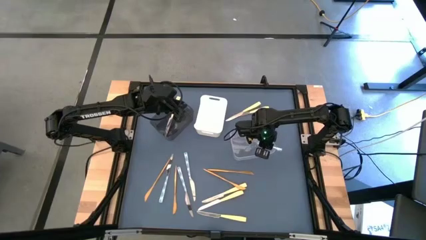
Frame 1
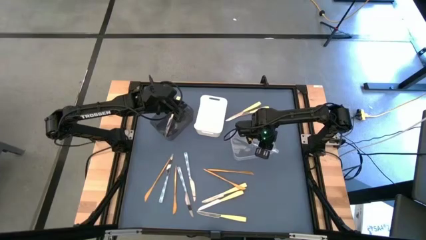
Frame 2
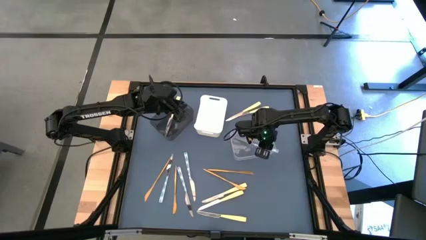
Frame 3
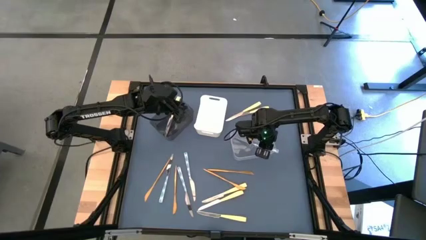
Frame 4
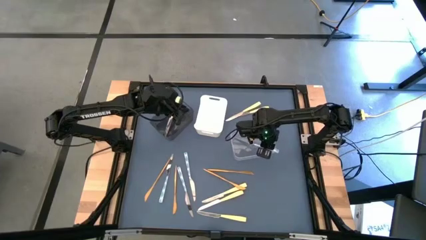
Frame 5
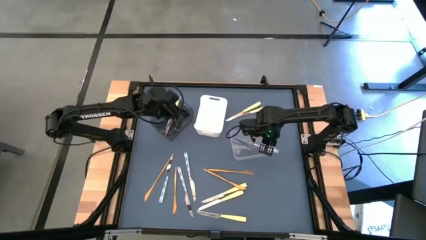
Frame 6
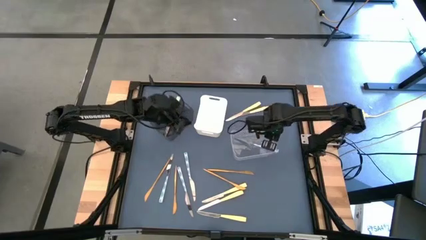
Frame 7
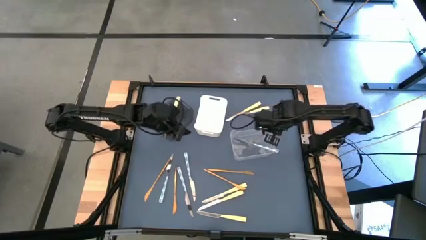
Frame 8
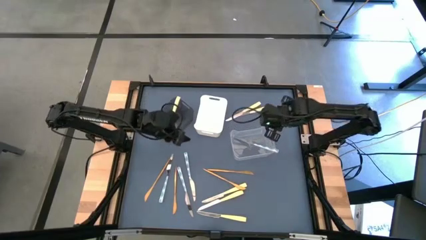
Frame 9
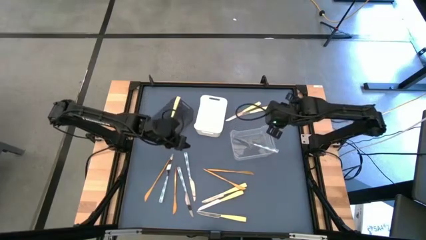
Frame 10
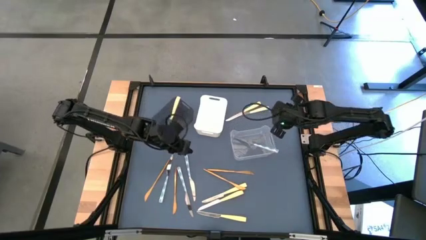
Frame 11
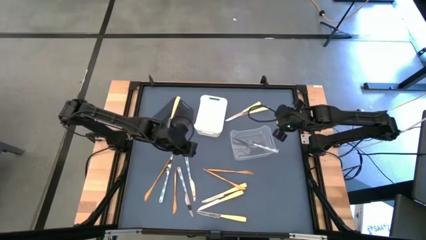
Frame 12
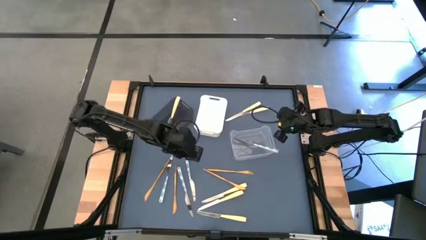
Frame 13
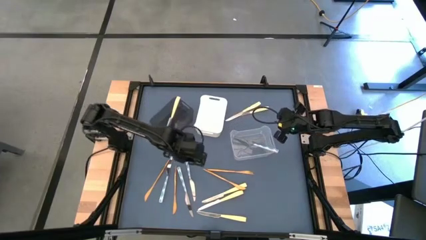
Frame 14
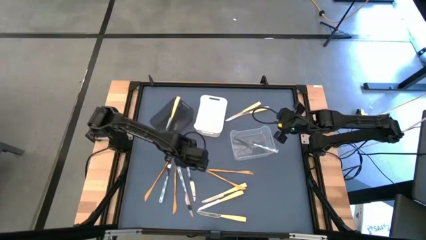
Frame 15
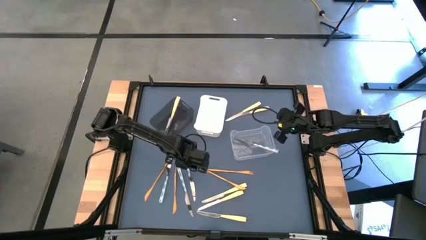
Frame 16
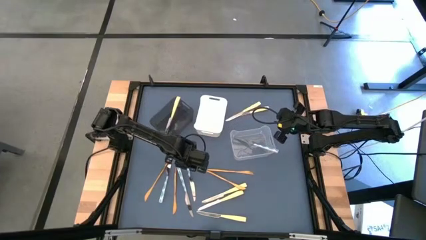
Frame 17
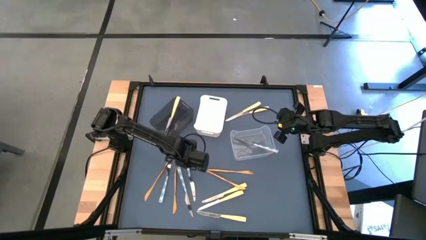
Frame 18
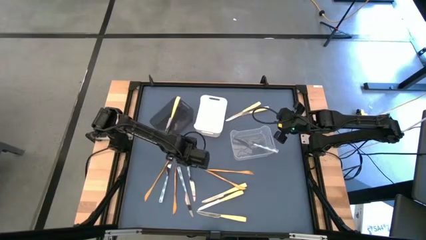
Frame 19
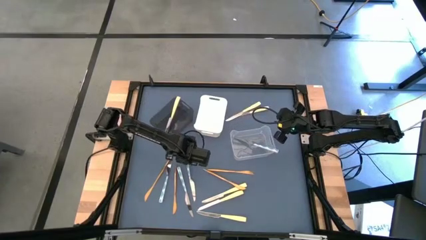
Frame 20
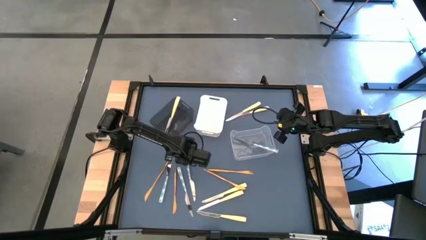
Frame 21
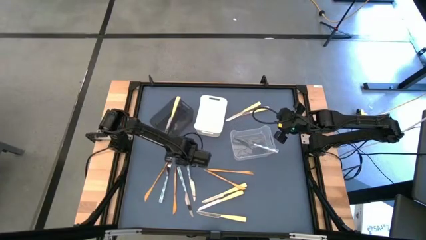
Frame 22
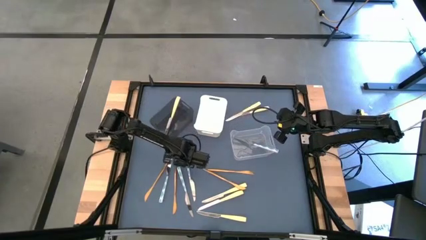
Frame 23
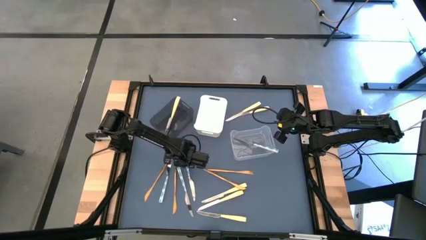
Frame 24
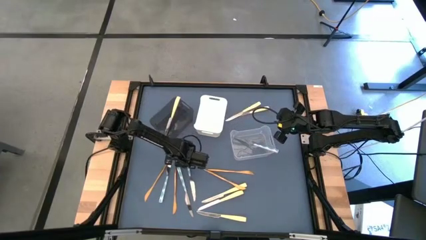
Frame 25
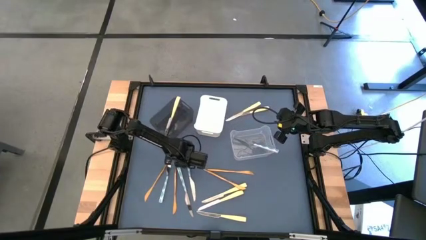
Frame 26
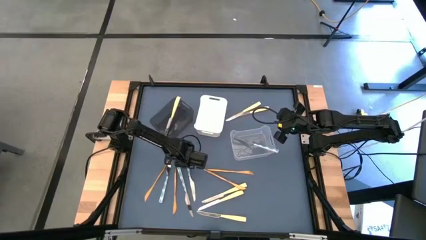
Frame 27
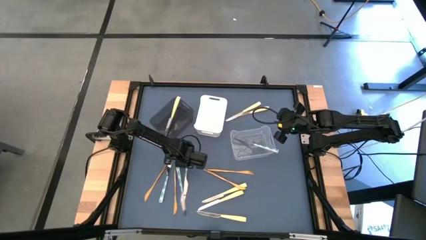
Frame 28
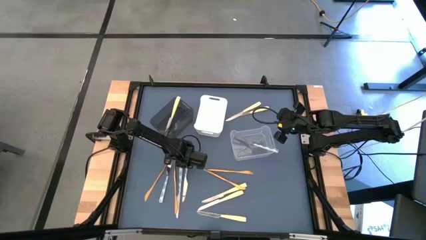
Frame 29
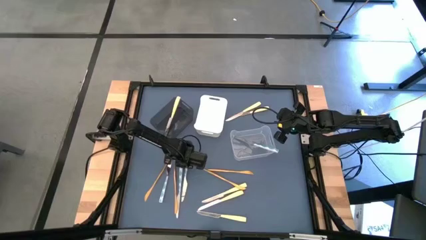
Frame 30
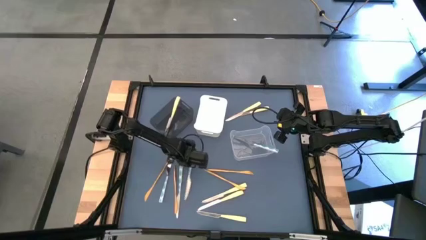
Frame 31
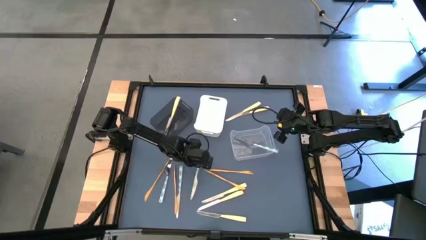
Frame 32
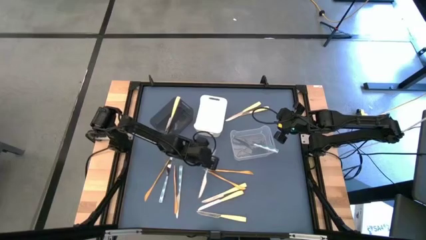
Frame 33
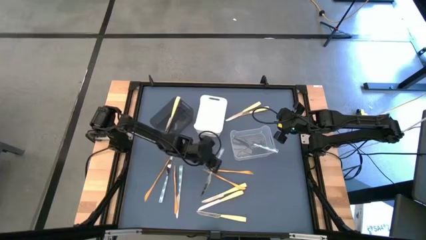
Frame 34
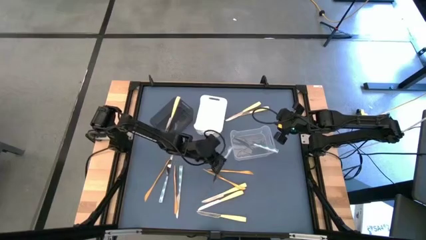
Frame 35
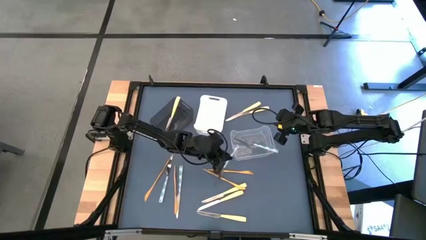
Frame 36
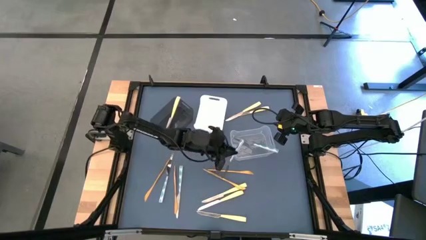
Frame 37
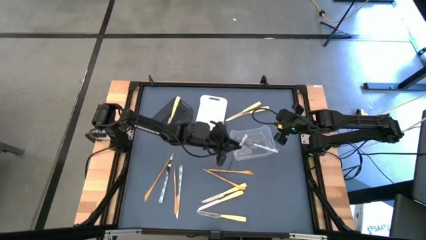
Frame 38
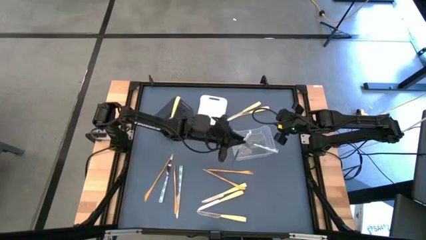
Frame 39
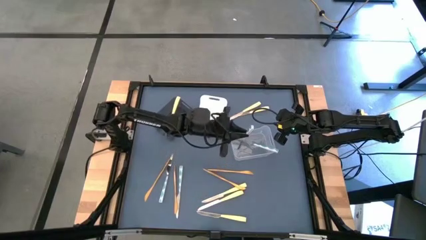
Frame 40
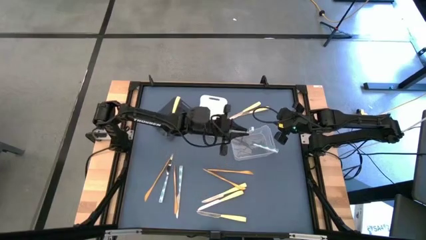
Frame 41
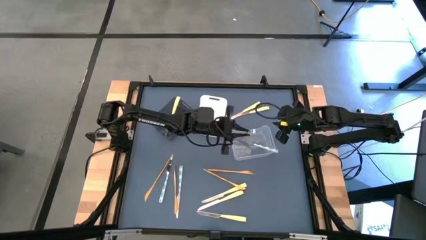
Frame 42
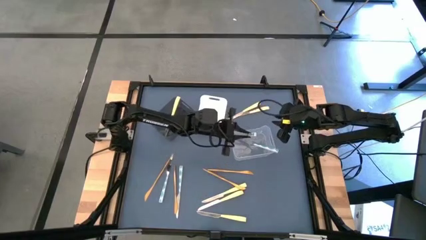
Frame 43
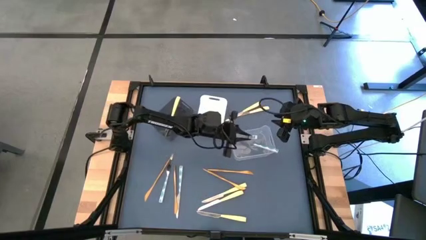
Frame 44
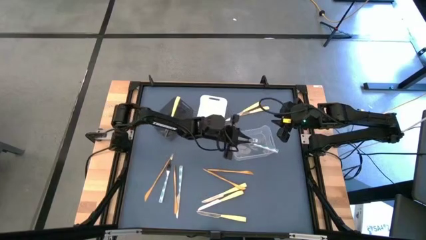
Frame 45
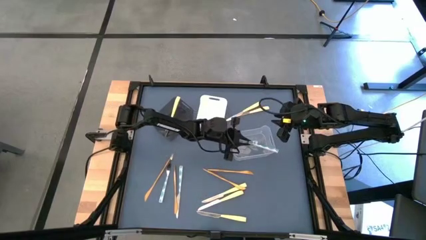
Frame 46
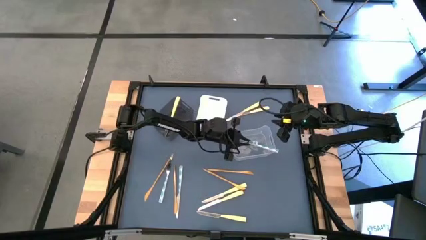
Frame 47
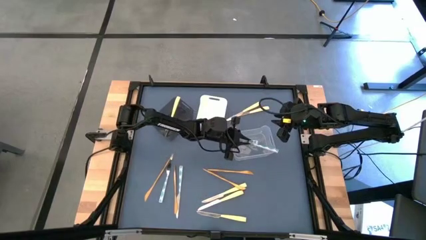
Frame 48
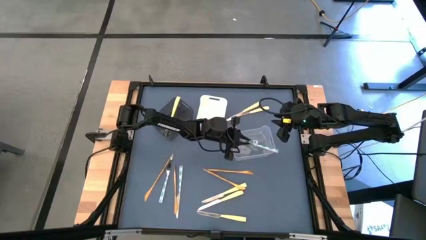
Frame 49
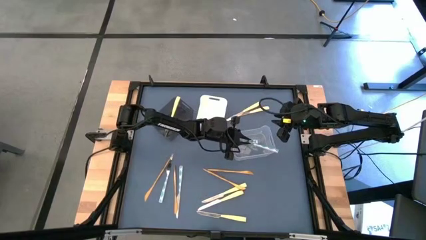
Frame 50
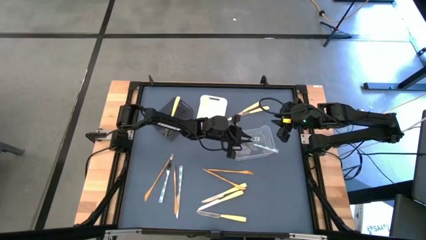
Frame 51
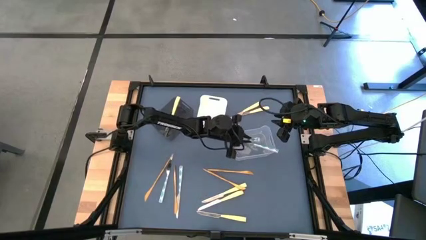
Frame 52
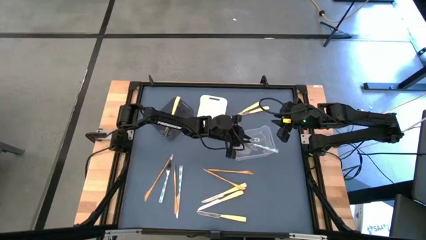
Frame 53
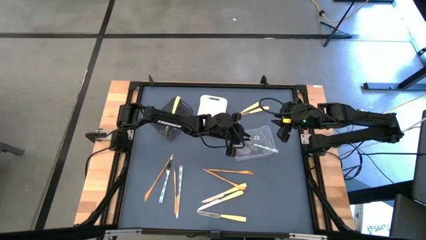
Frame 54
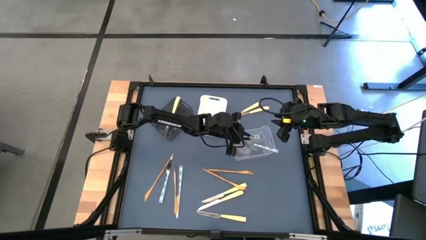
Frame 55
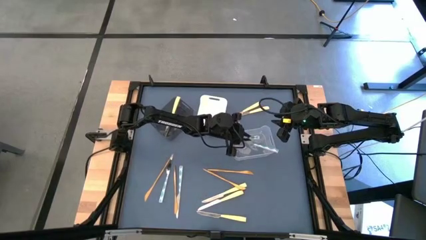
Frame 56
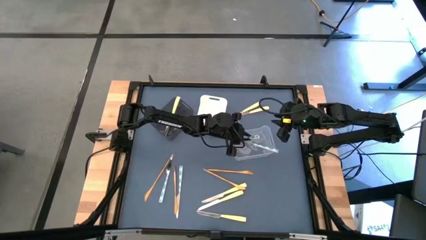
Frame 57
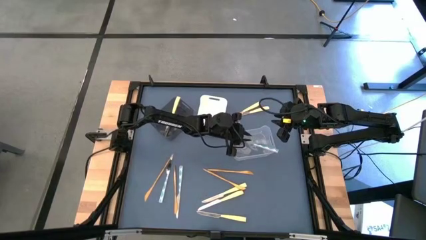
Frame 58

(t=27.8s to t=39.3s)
Task: Sort silverware by color (type)
Put the right green knife into the transparent bin

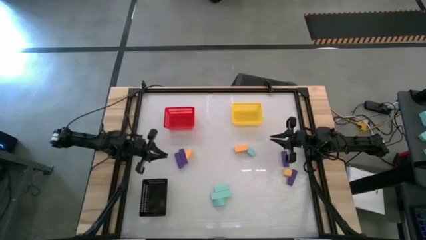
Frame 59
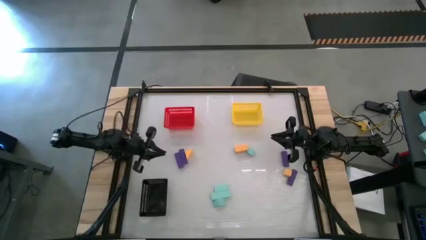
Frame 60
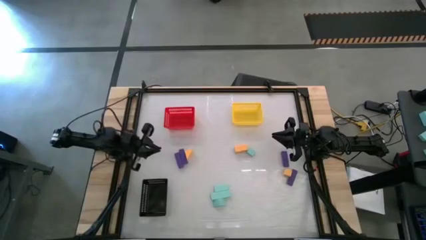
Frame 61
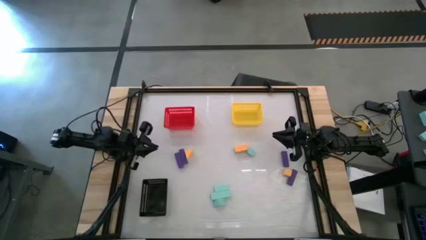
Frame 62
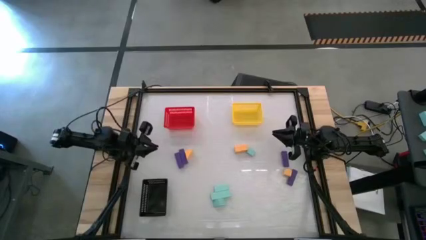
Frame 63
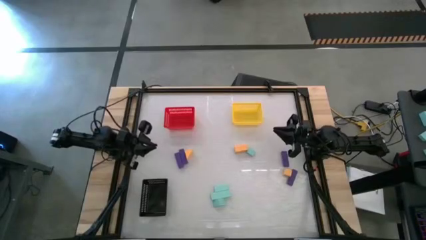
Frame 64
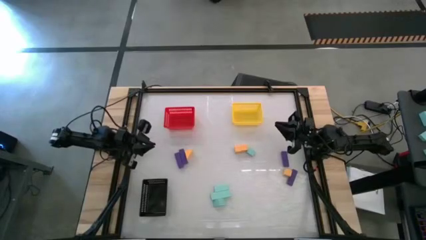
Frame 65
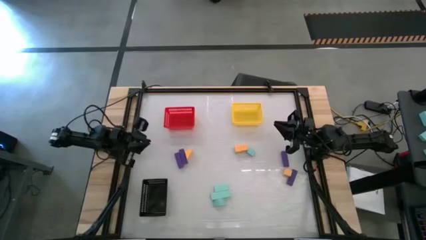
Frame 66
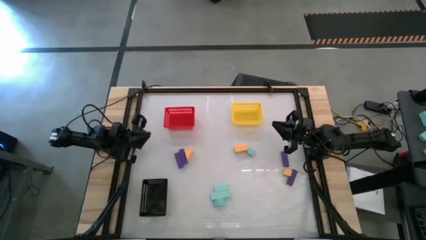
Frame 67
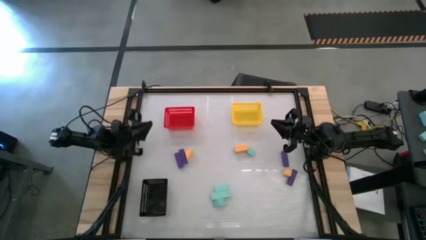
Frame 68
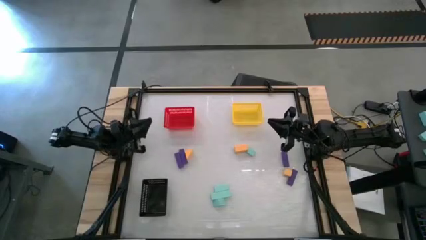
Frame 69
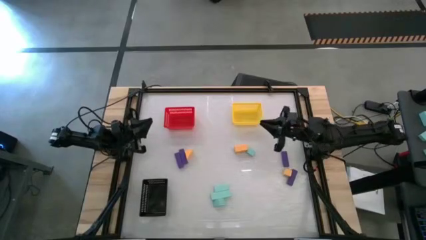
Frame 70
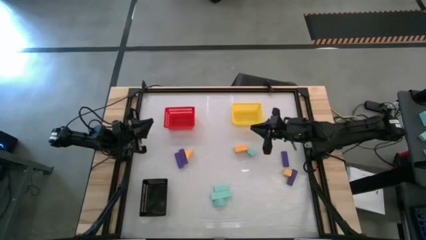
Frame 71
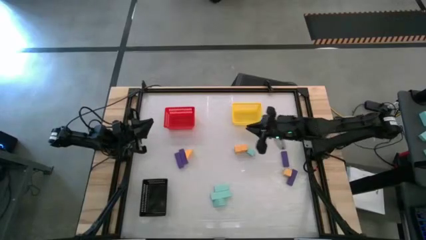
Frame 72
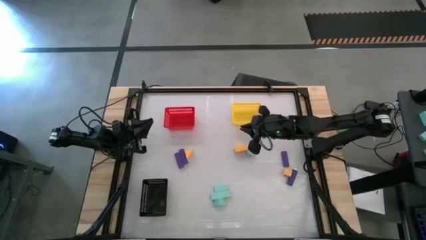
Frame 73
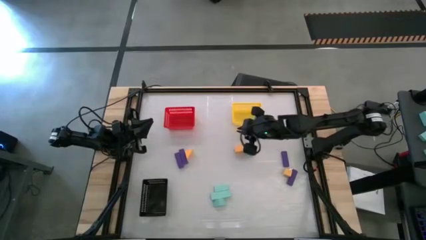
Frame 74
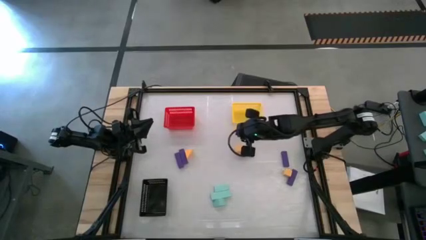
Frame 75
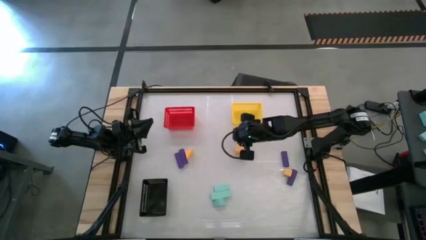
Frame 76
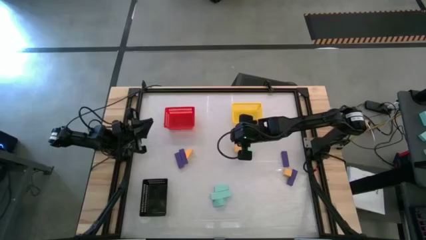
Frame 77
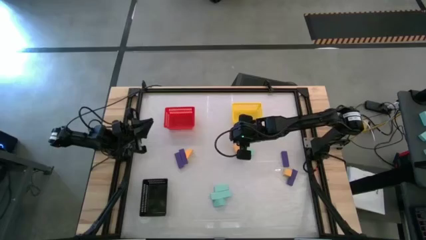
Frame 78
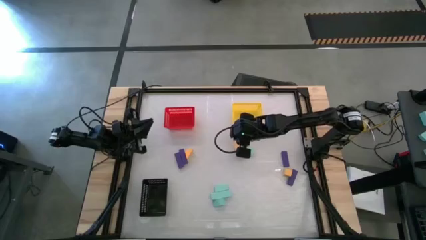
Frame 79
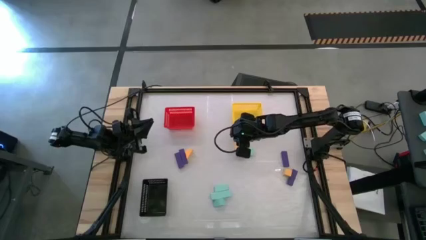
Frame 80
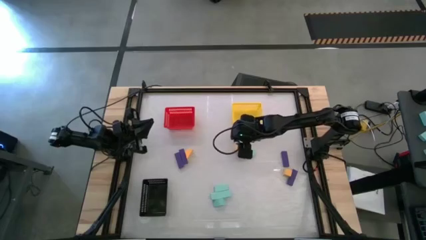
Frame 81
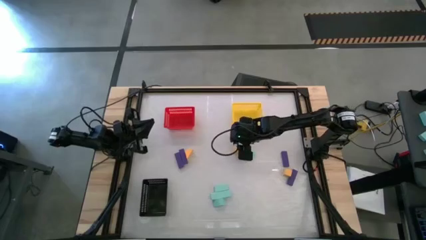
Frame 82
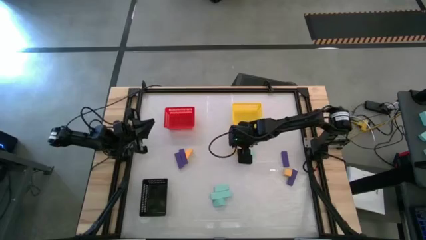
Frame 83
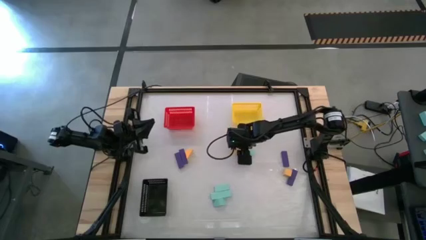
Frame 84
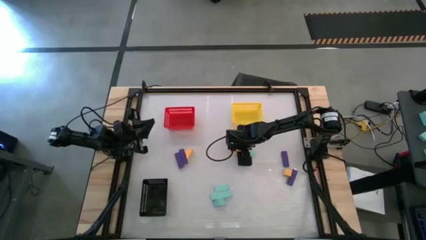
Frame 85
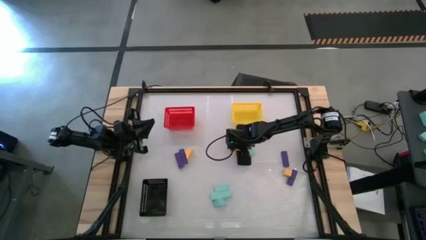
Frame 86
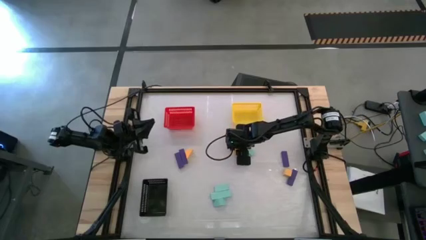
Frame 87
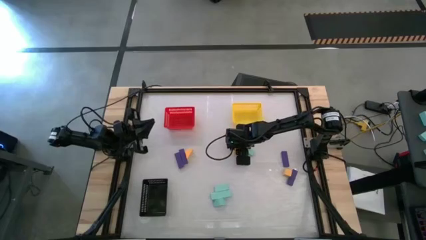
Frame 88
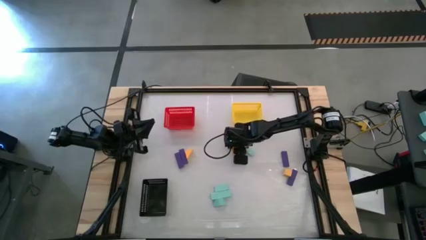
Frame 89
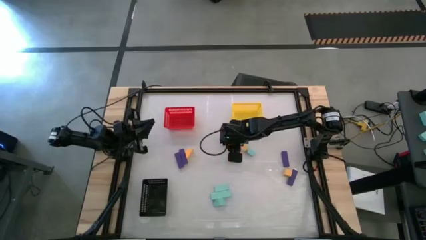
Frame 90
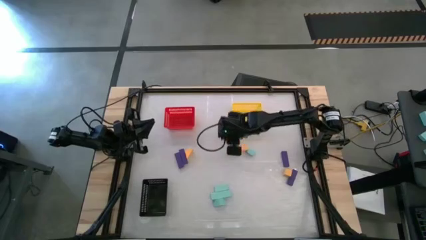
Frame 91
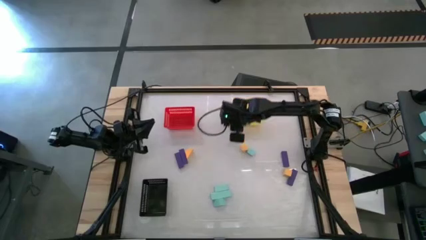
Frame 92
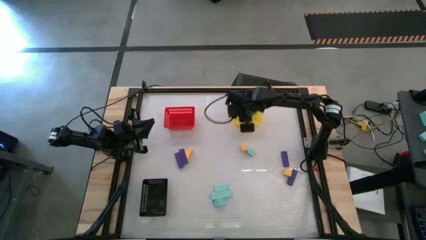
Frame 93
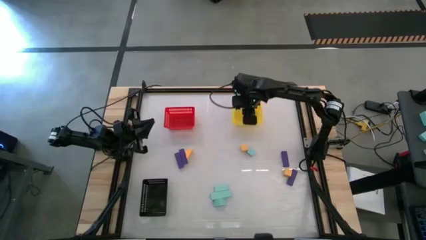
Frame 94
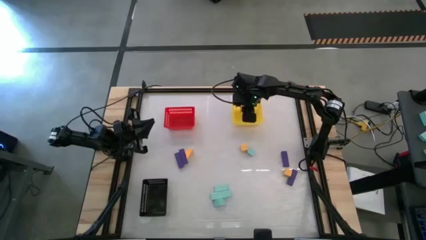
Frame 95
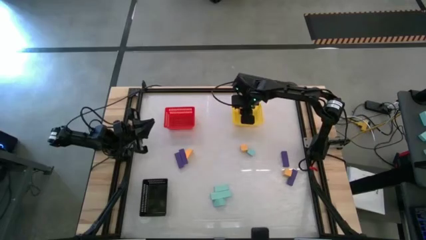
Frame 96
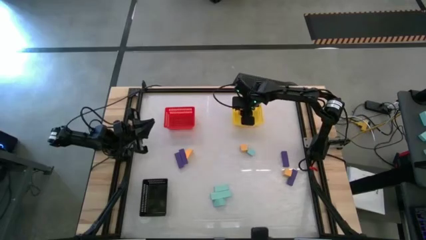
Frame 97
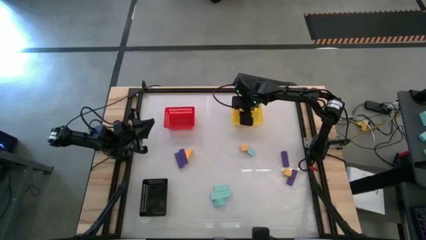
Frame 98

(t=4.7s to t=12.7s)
Task: Sort & place blocks by color
Put the yellow block into the yellow bin
